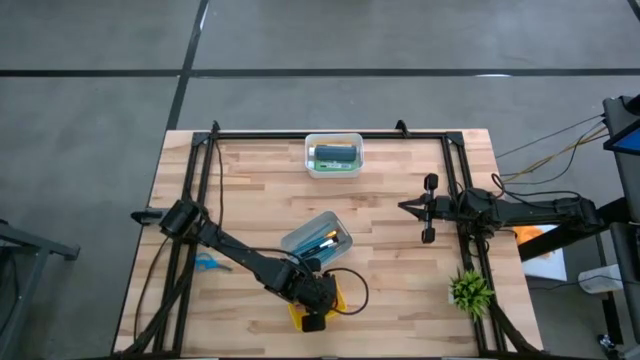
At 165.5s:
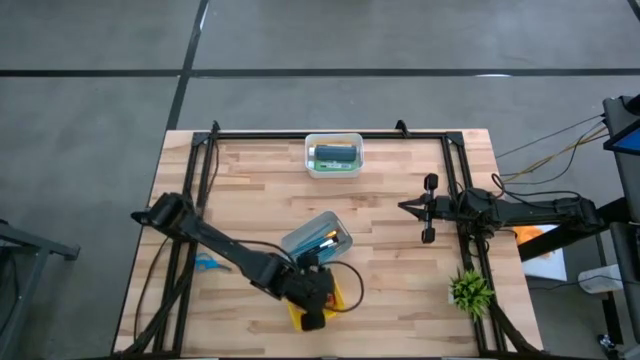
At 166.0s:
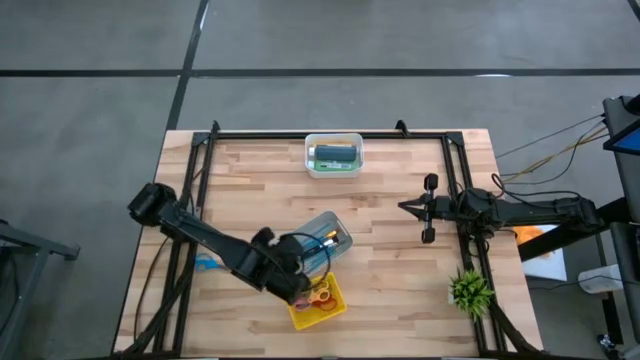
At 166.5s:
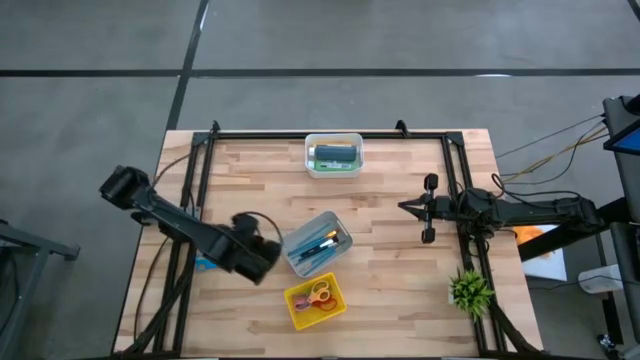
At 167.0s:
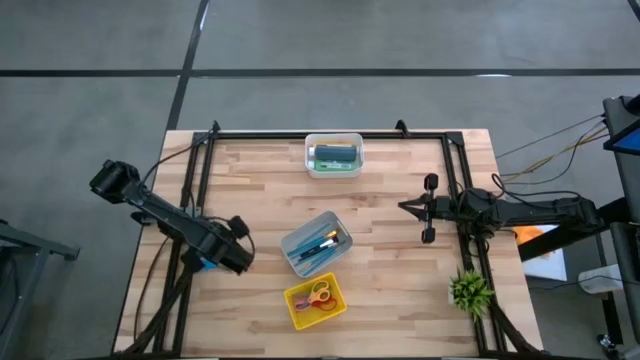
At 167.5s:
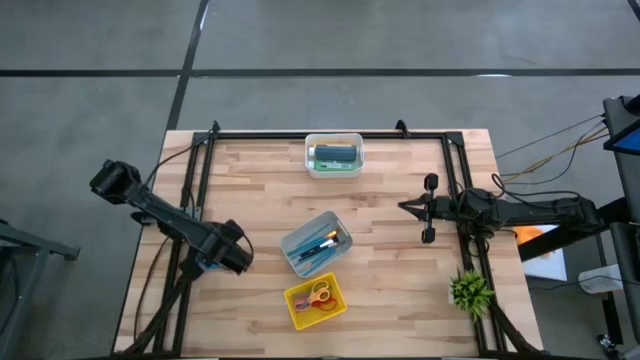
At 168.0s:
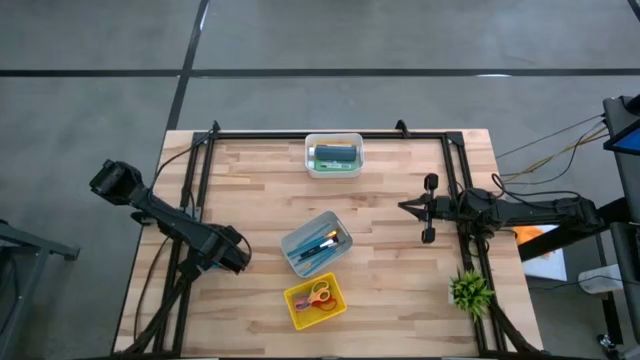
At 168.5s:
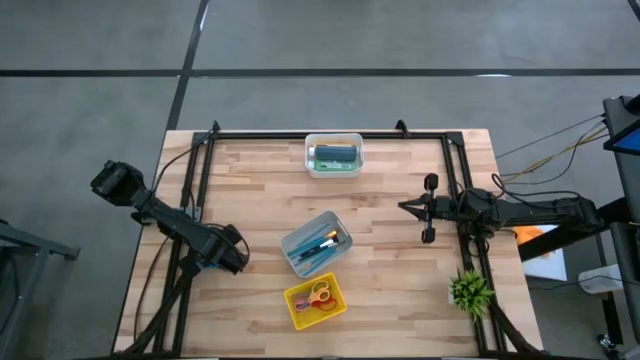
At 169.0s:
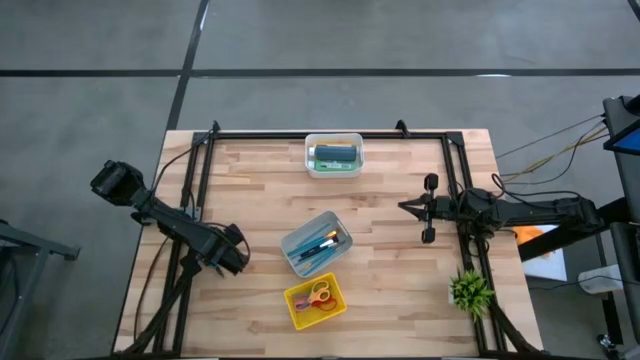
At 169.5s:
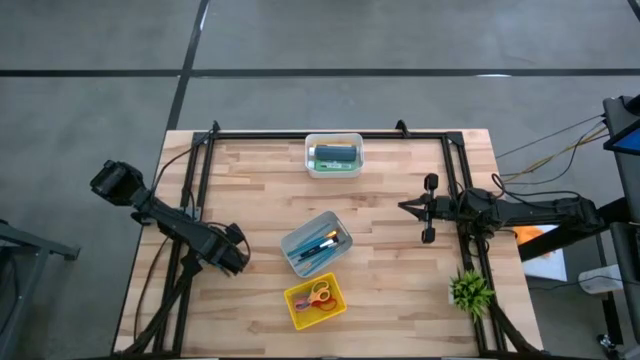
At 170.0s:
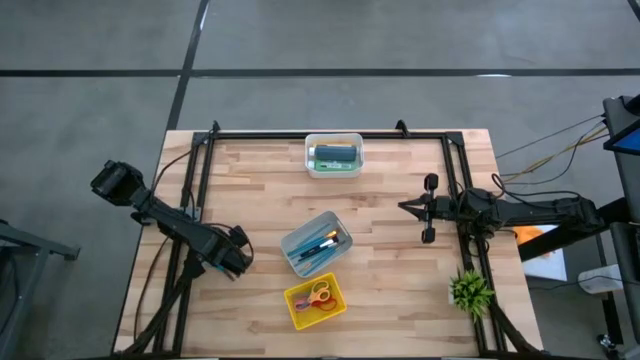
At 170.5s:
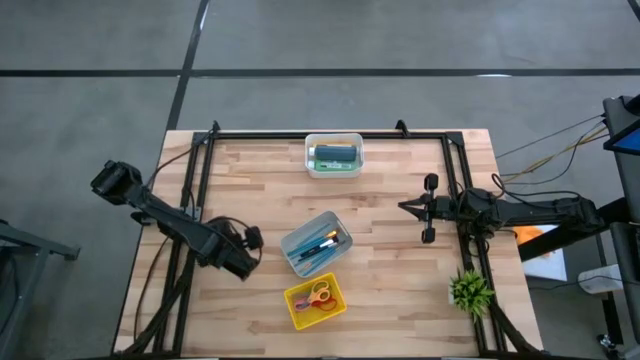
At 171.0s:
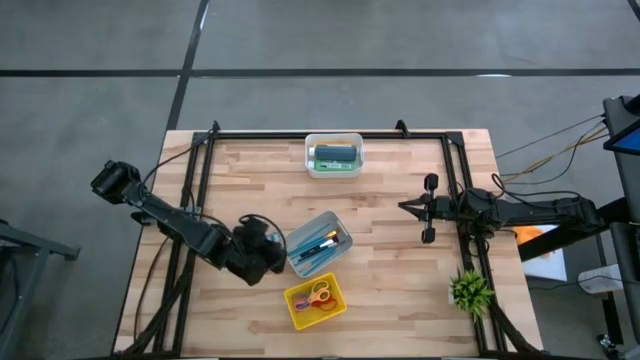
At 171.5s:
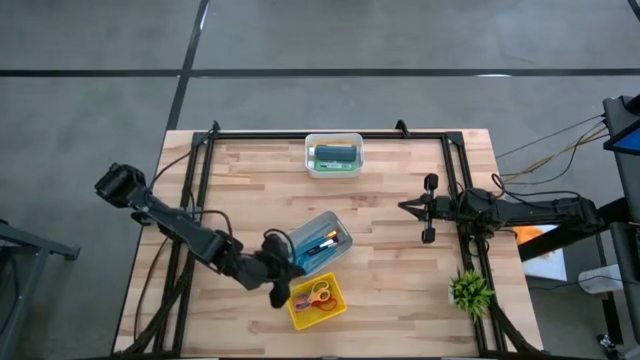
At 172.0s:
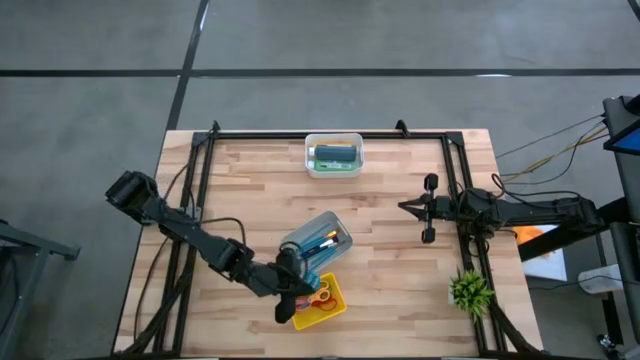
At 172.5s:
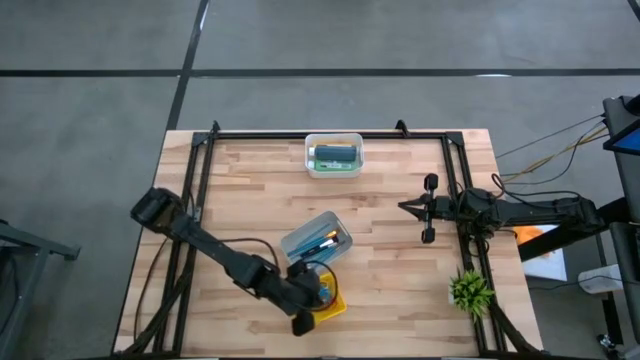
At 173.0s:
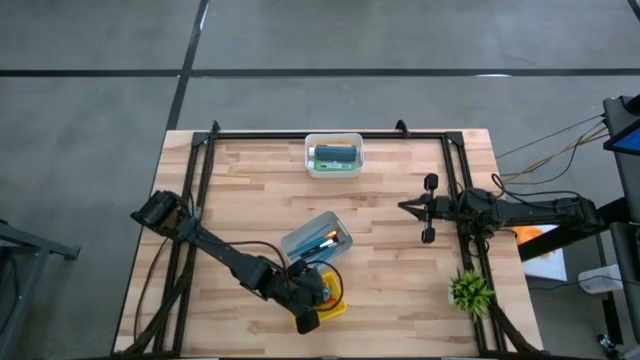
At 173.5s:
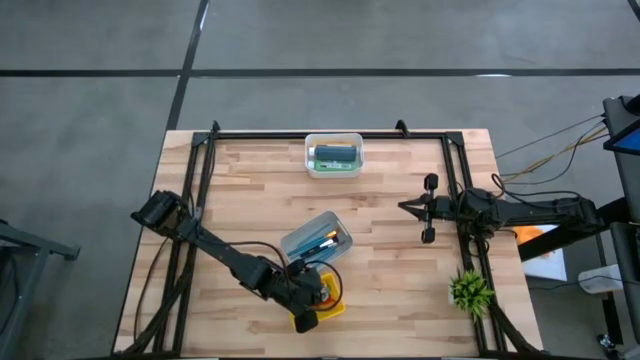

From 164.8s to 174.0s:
Task: Pick & Place Paint Supplies
Put the blue scissors into the yellow bin

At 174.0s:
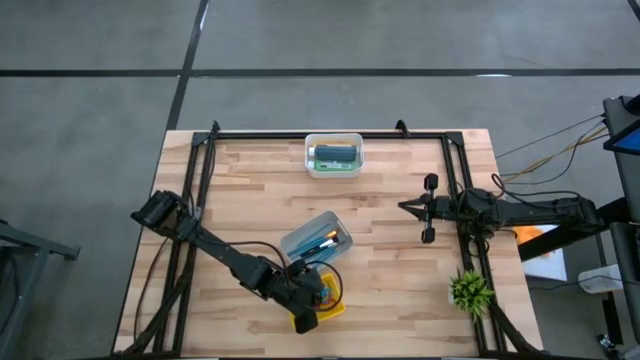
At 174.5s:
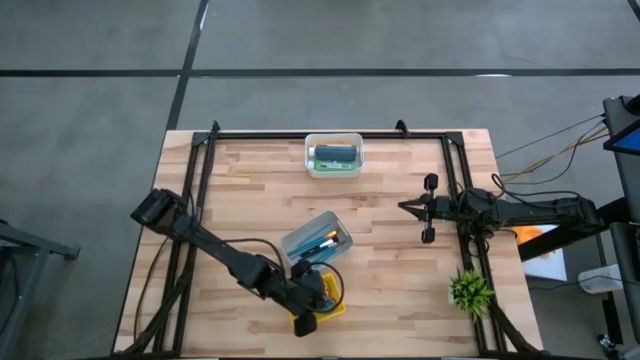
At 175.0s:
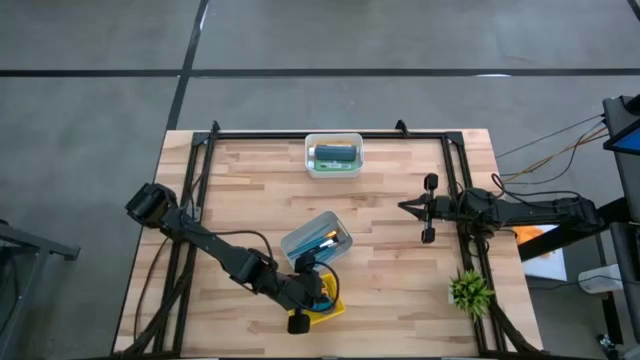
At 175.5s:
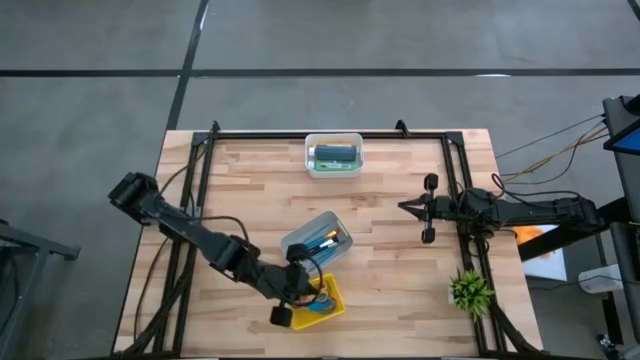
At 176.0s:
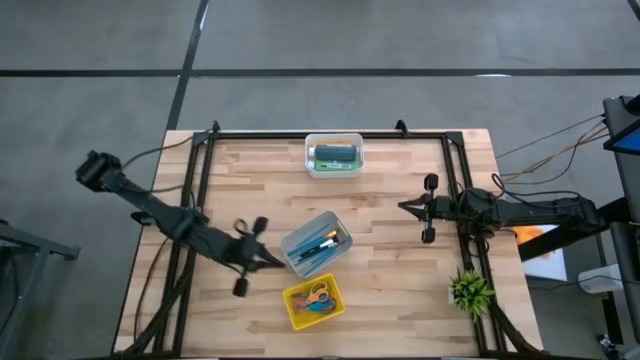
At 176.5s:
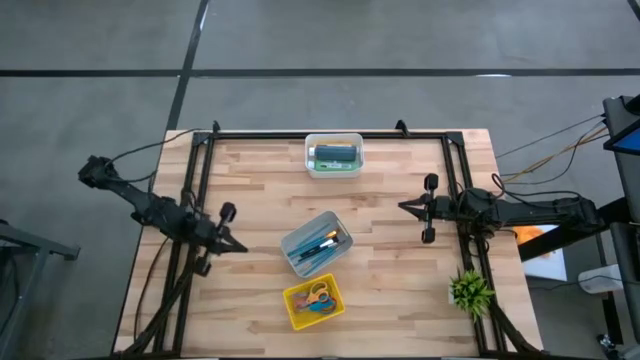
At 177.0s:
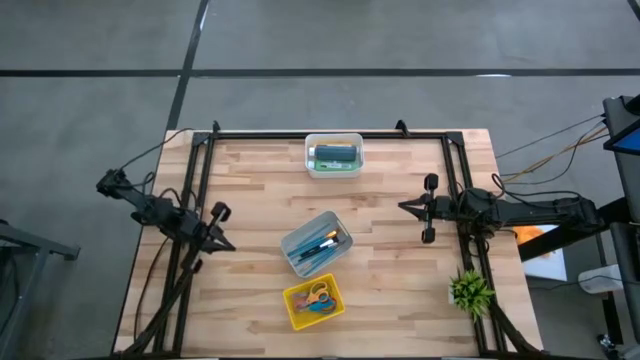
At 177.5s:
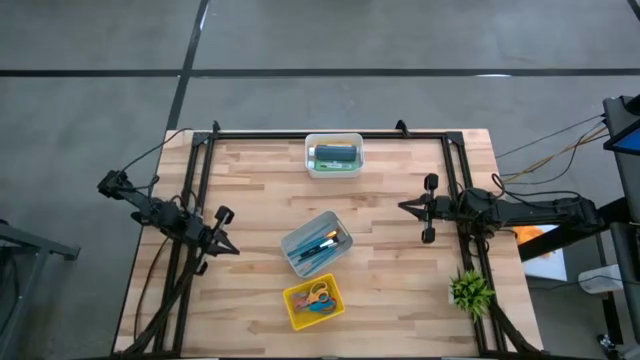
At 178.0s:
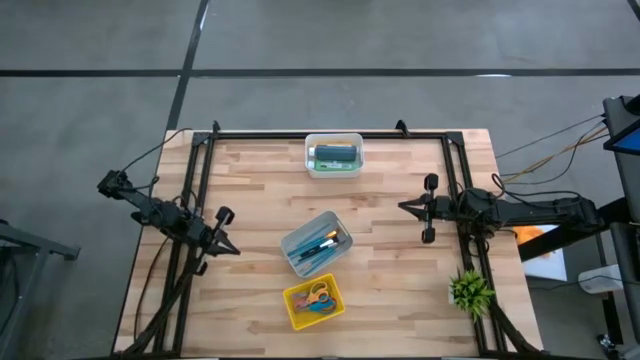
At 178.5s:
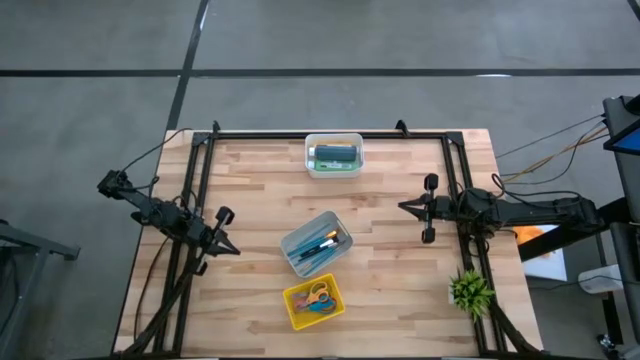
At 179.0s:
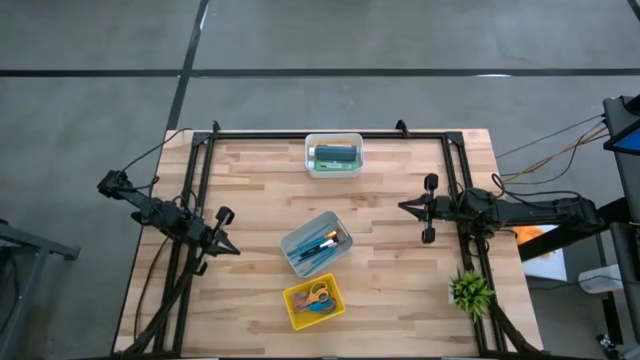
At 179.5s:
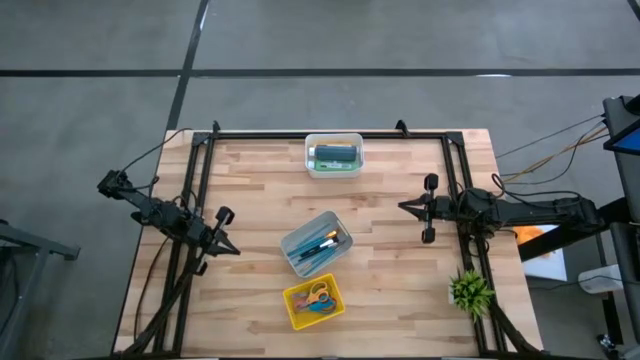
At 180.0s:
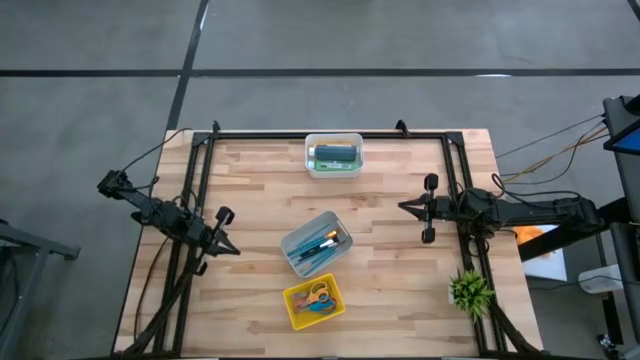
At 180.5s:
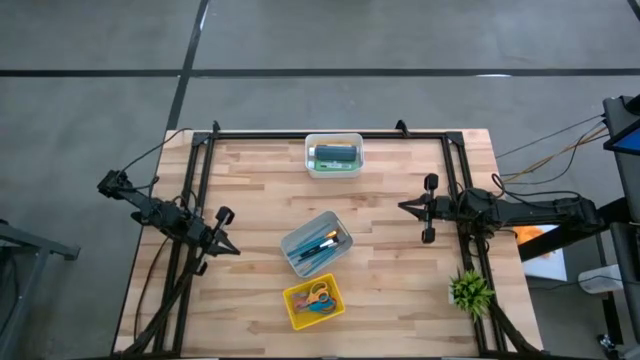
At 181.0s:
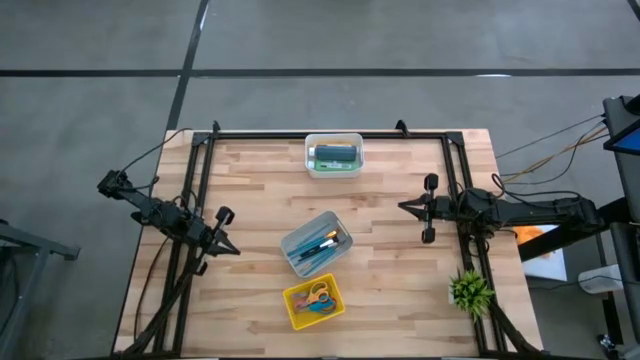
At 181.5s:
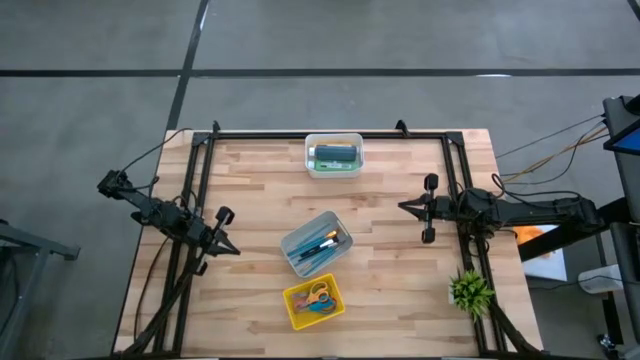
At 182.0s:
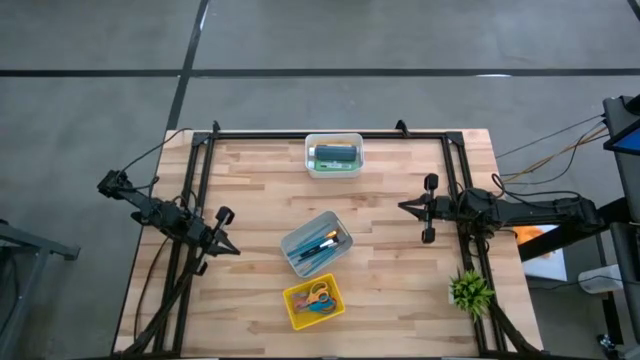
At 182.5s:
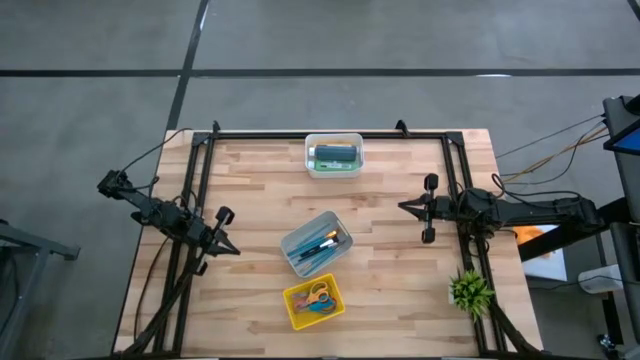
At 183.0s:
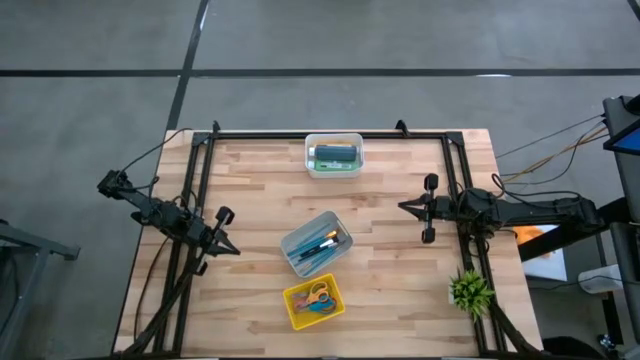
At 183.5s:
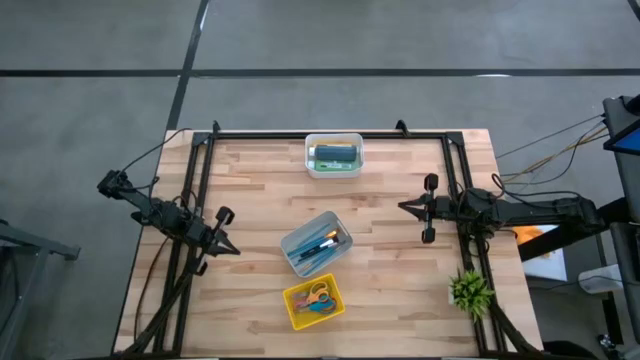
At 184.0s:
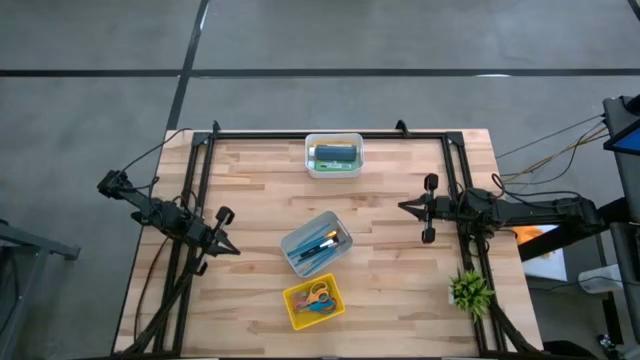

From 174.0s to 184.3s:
Return to Home Position

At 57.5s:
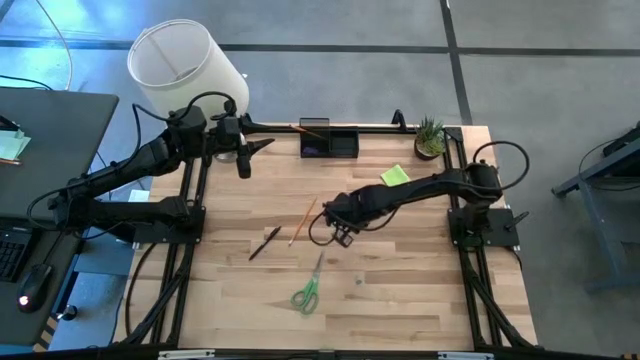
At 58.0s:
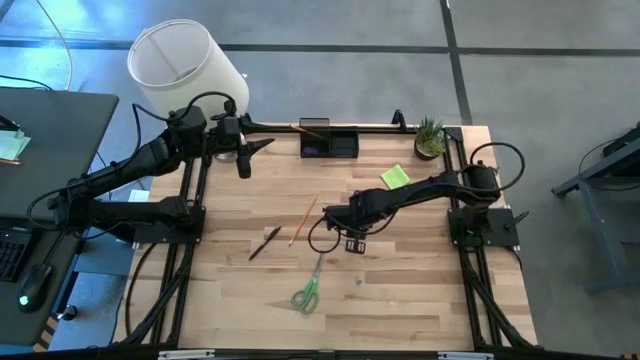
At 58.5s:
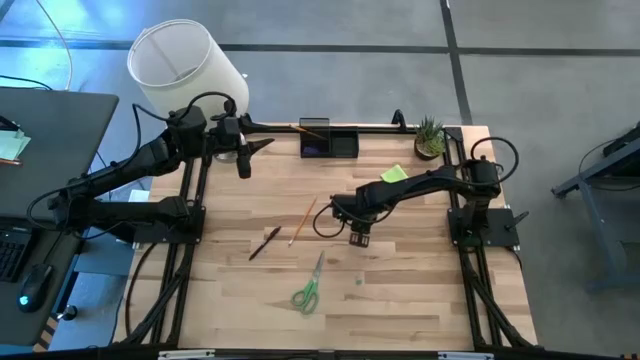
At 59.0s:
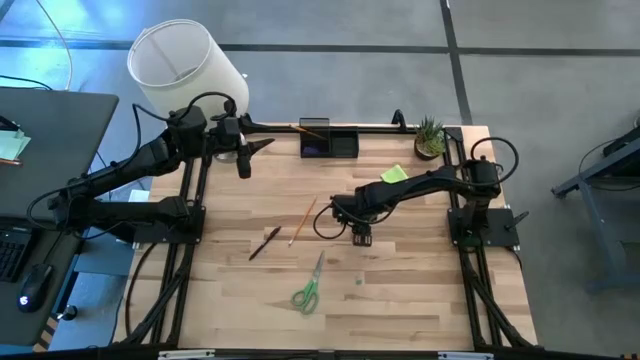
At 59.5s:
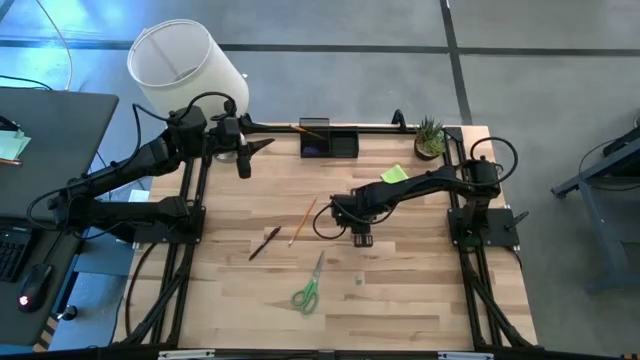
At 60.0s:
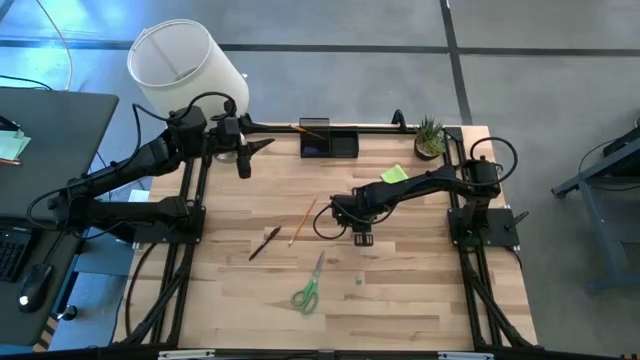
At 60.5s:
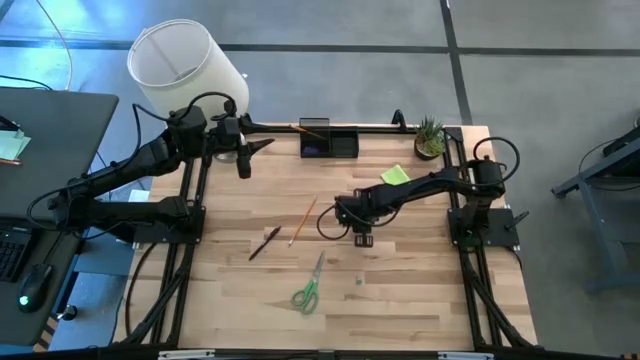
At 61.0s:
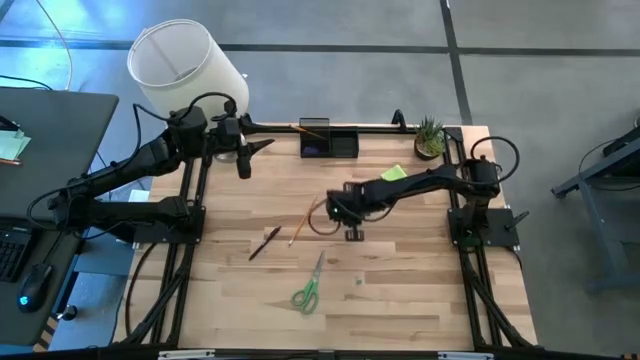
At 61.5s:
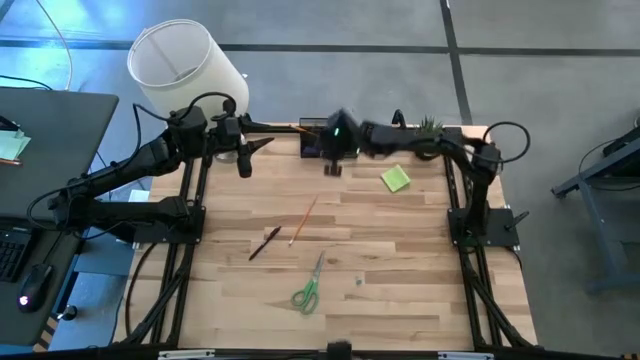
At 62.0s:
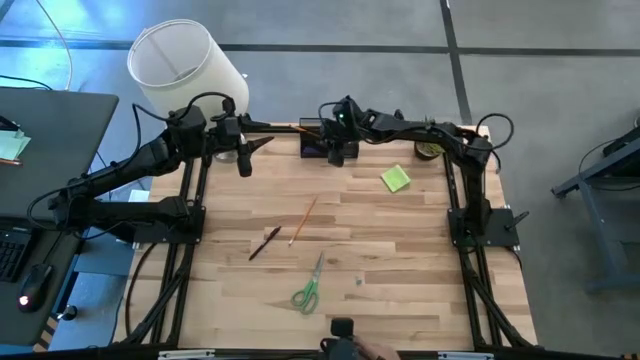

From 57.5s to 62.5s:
Task: Pick and place office supplies into organizer
Put the pink binder clip into the black desk organizer
